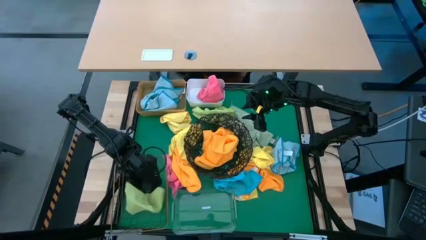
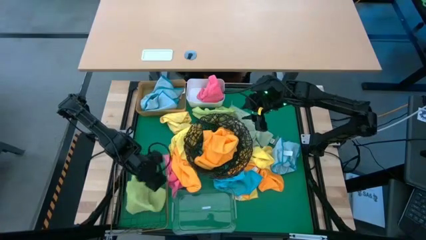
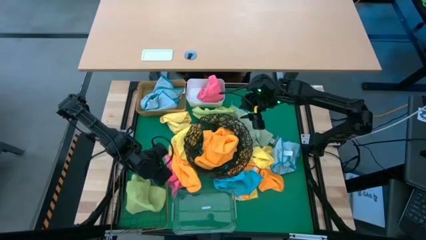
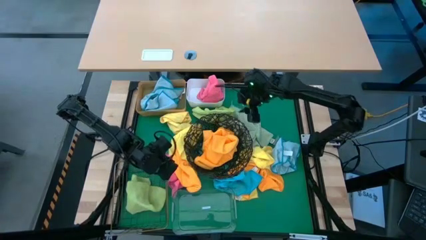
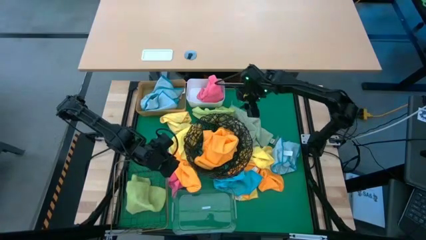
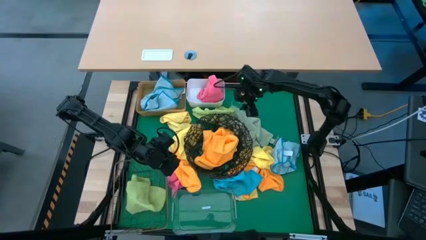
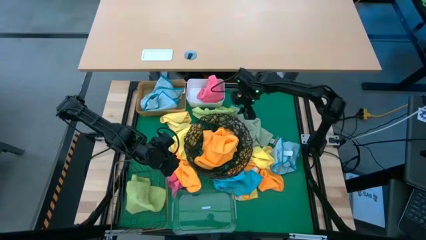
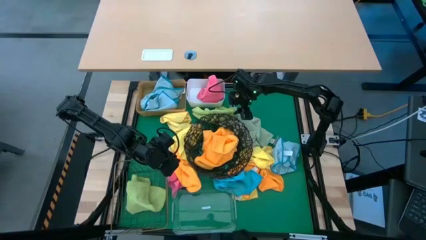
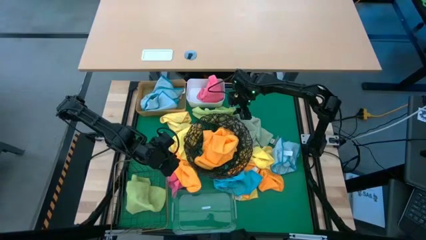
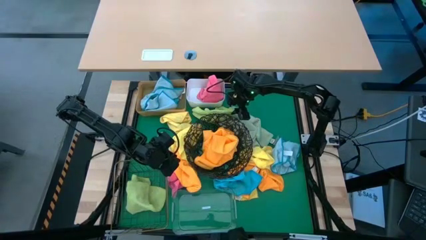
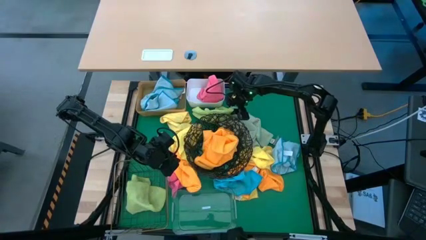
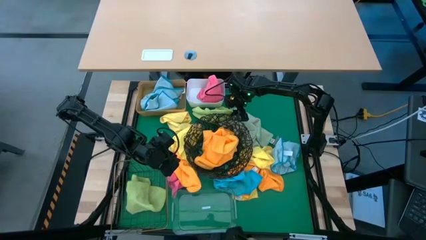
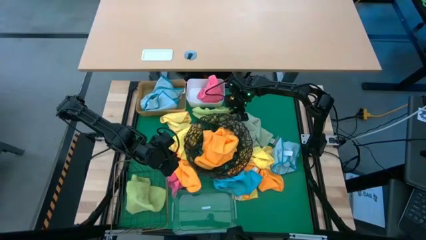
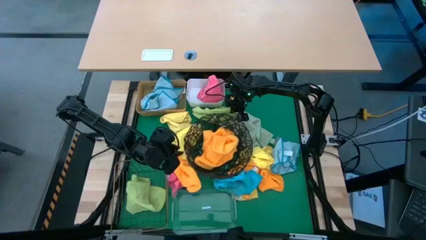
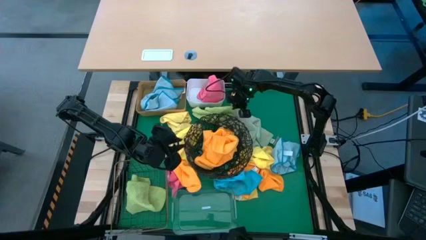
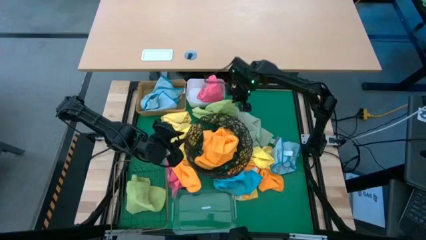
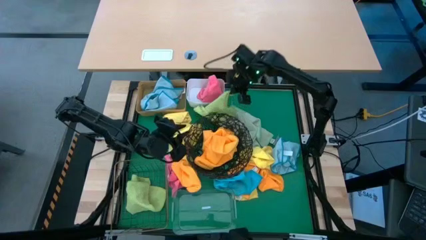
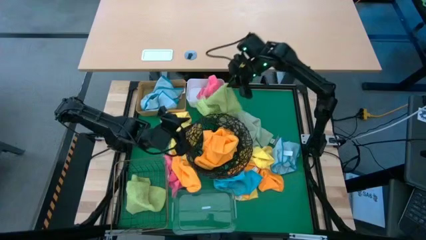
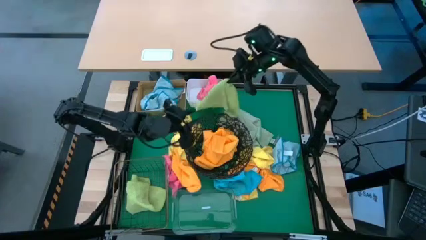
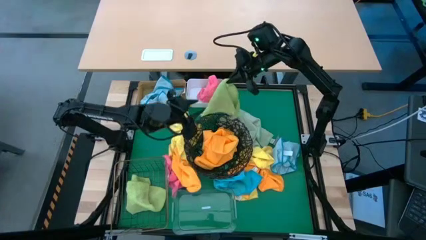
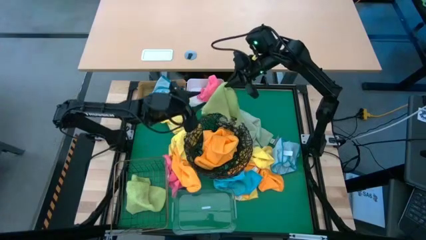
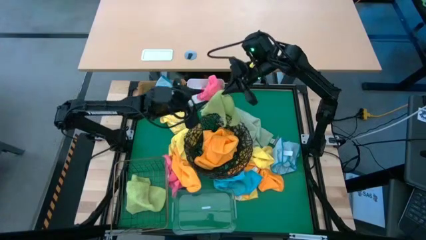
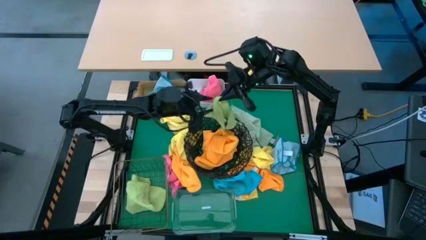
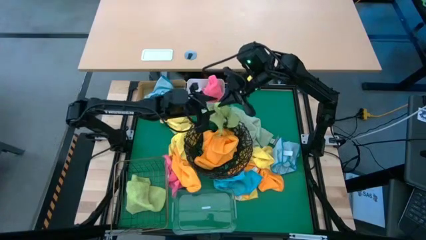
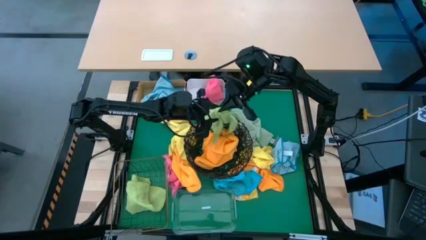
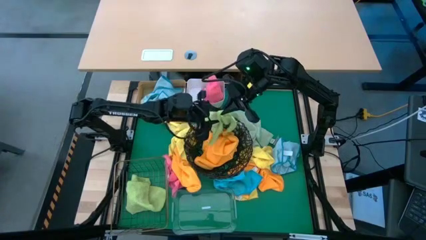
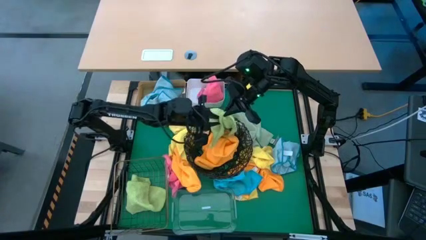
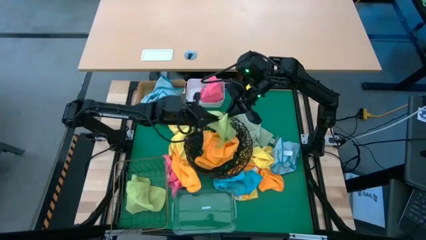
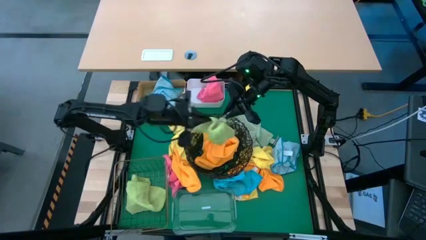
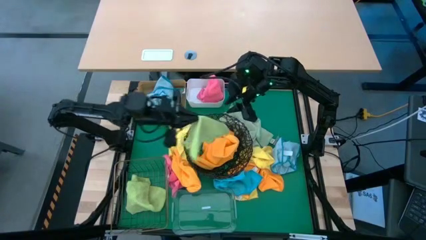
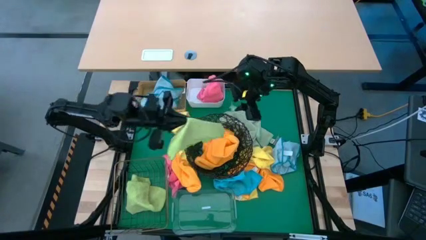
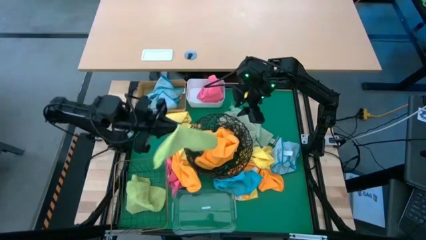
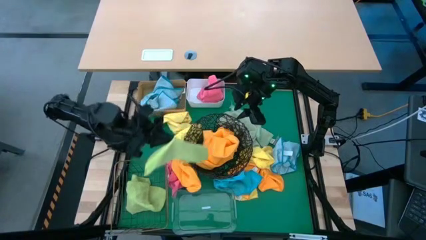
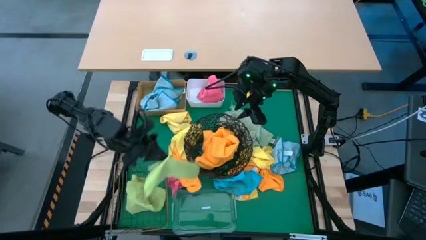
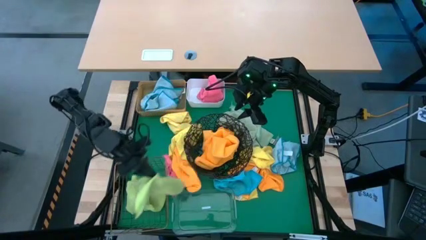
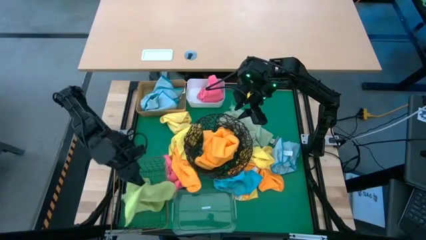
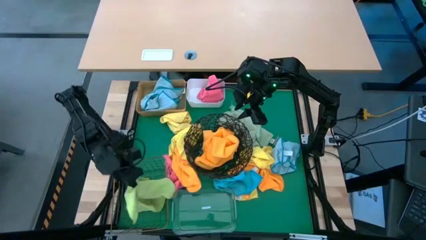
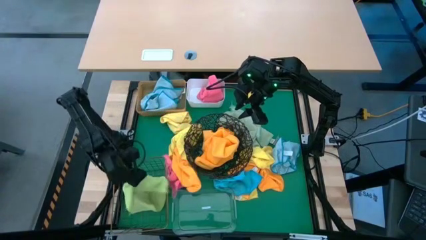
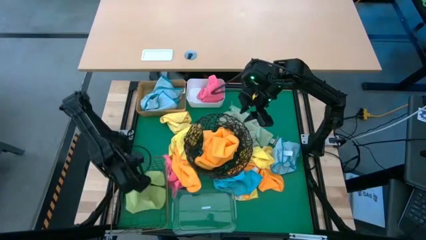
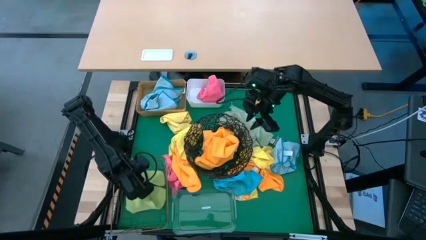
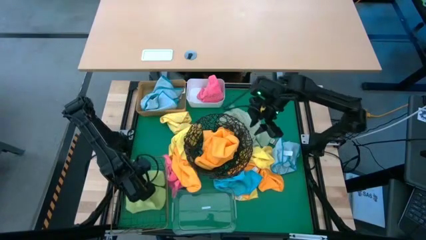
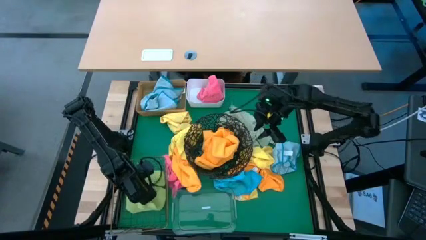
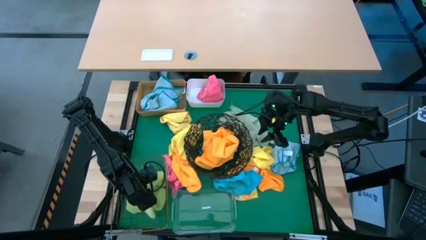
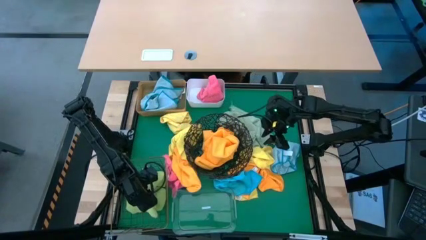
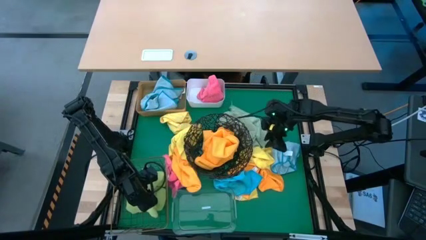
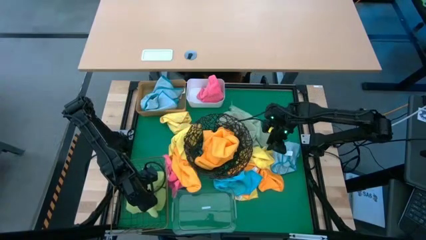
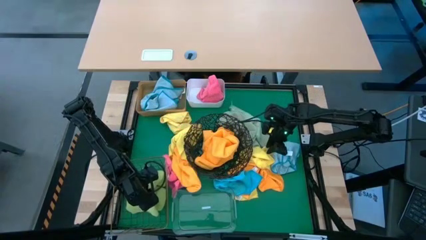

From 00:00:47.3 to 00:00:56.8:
Task: Sort microfiber towel by color & place in baskets
Put the green towel into the gold wire basket

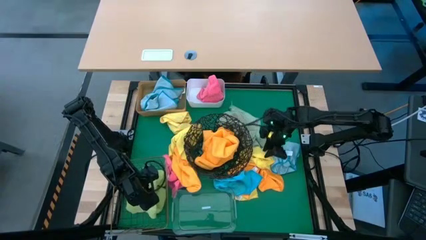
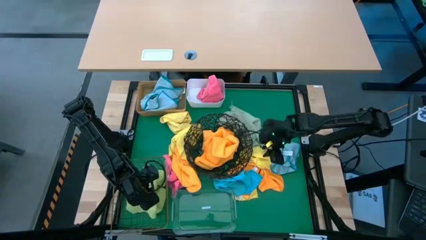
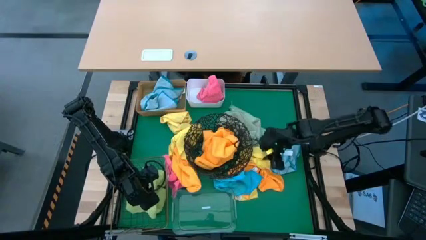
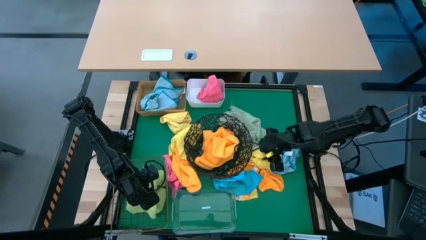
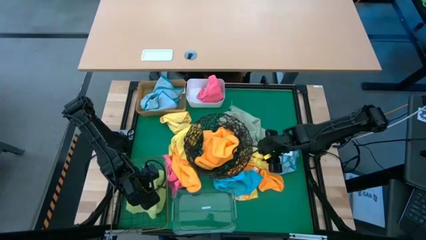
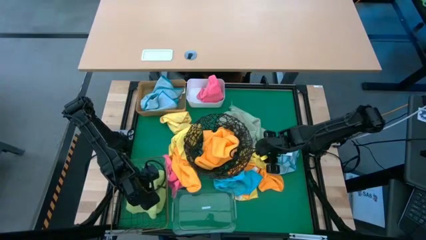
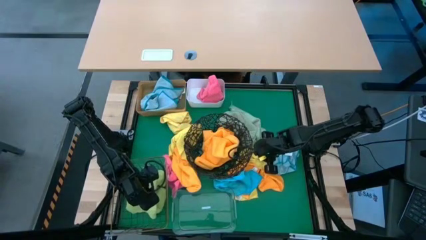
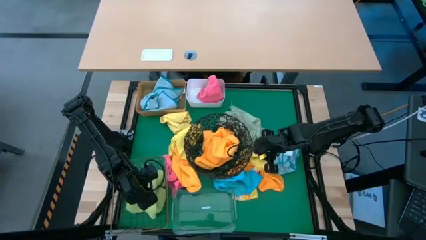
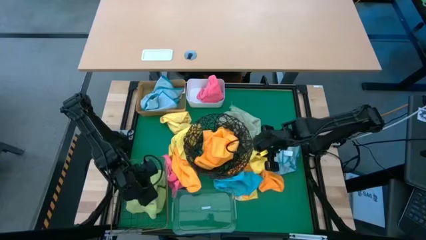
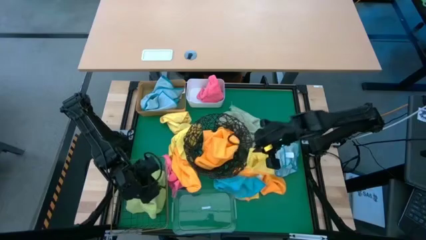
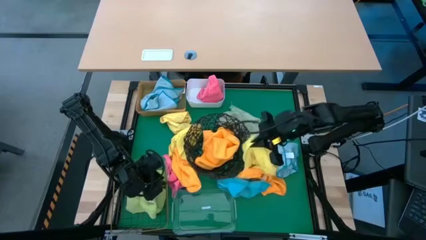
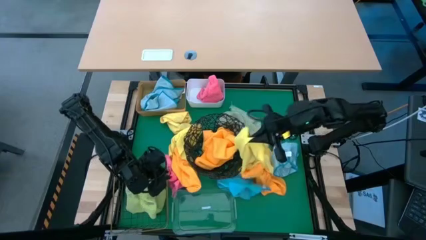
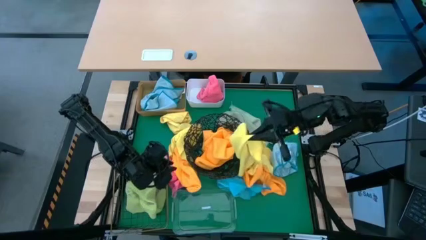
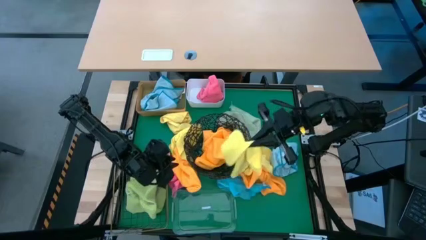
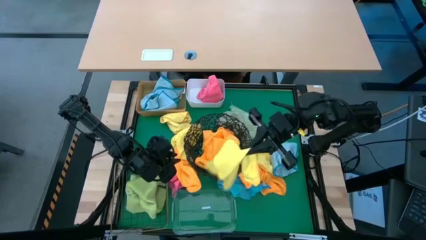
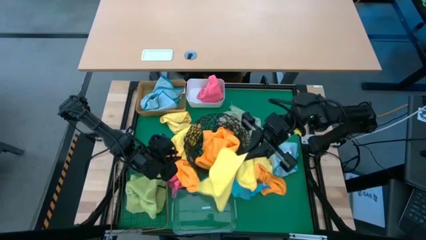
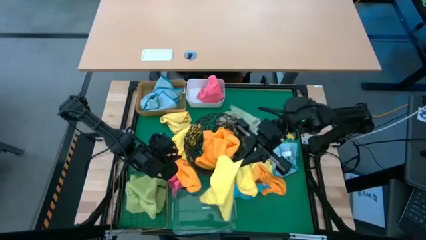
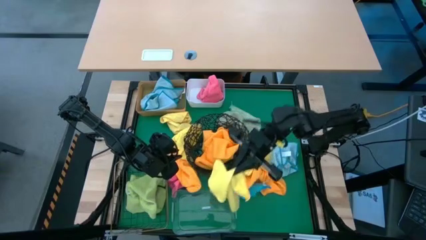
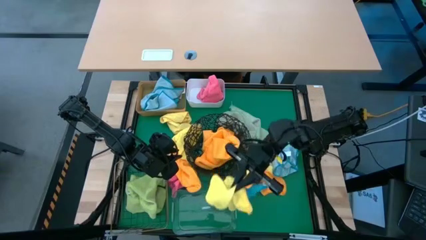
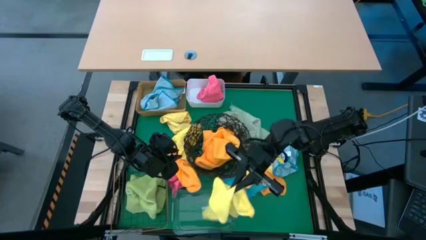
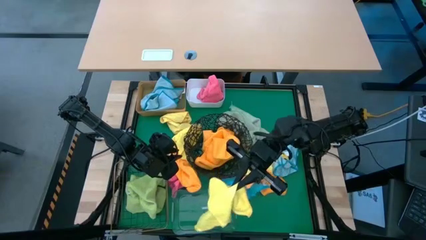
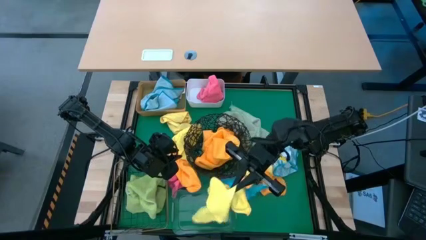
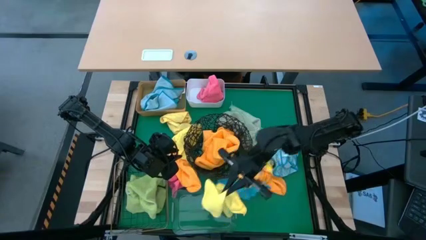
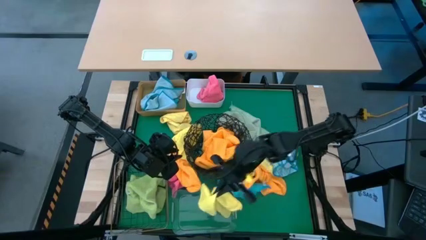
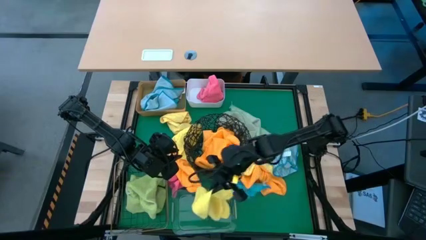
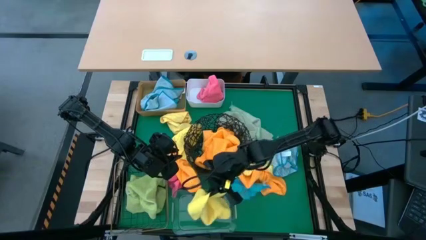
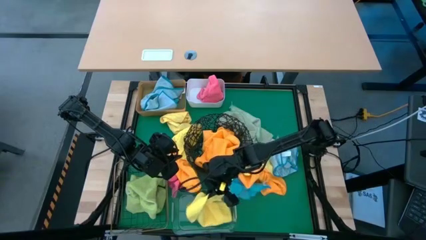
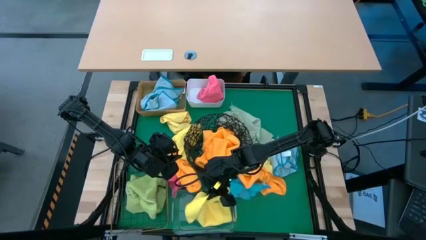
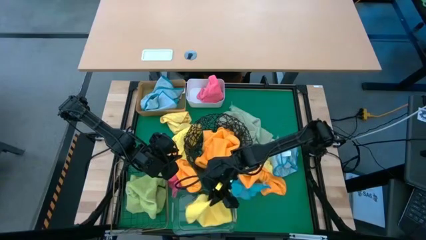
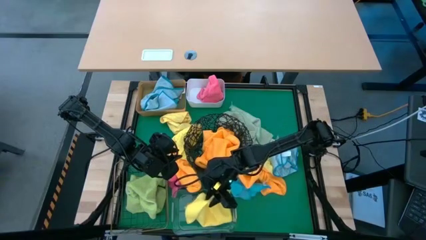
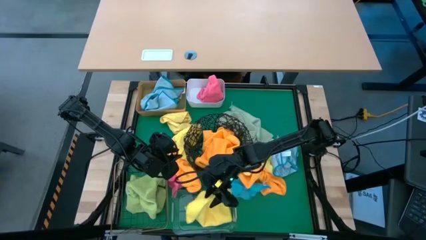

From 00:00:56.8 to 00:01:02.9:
Put the yellow towel into the transparent bin

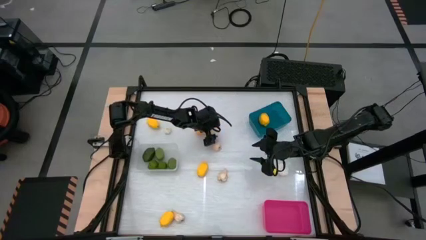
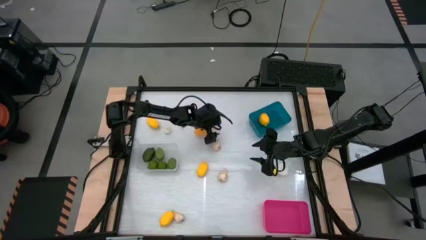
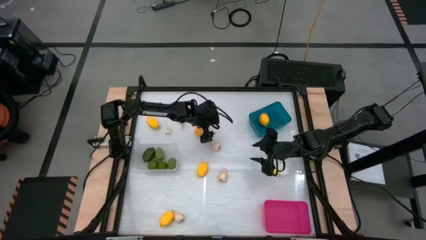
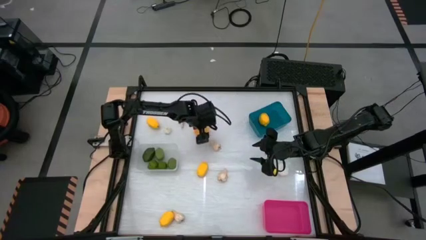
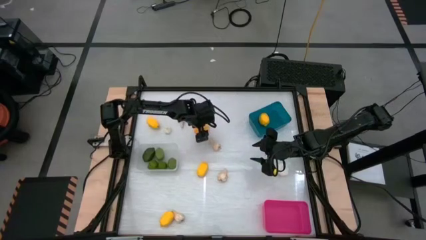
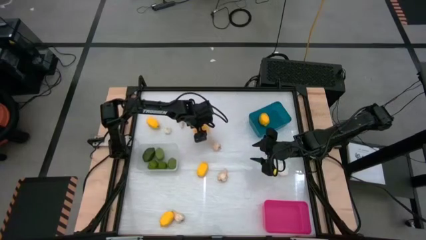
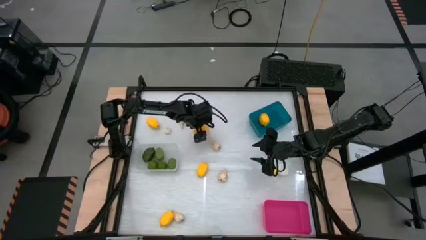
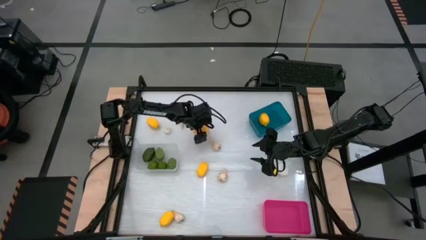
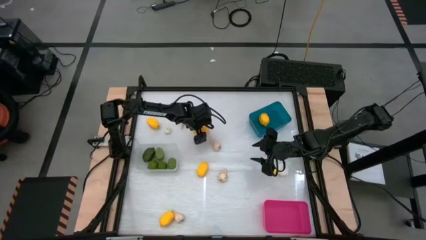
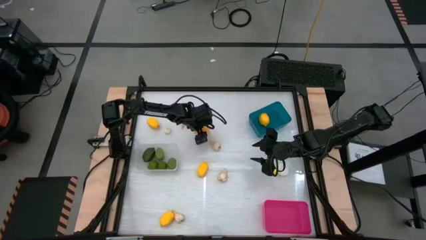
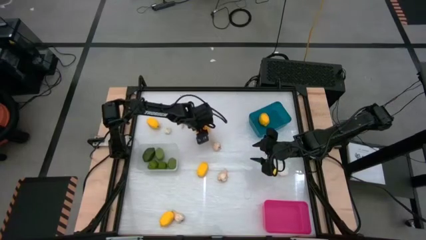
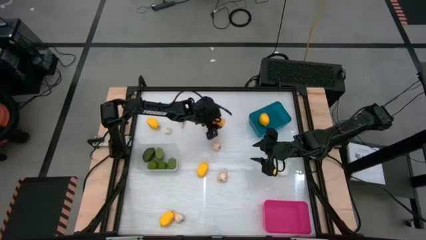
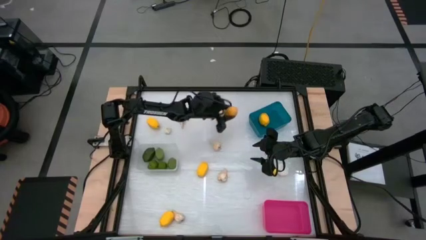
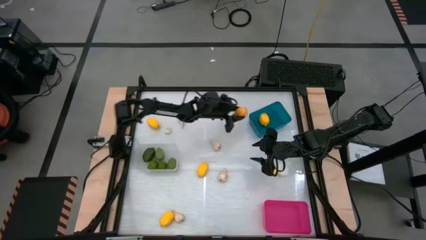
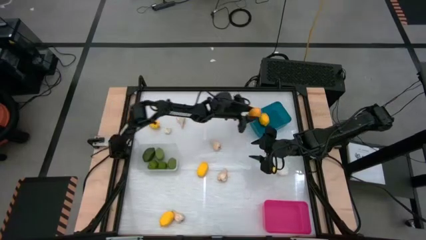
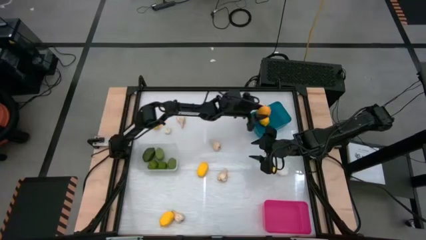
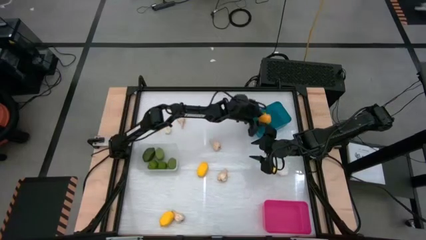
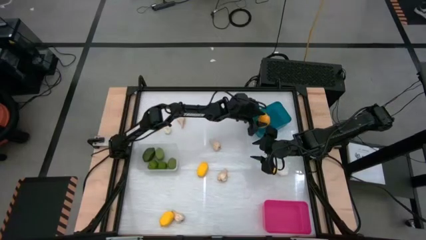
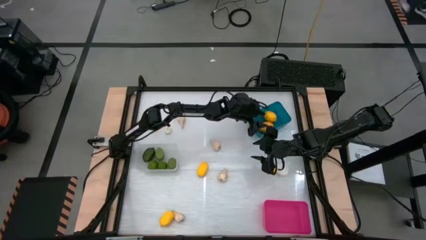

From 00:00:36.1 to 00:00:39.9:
Task: Sort produce into baskets
Put the yellow lemon into the blue bin
